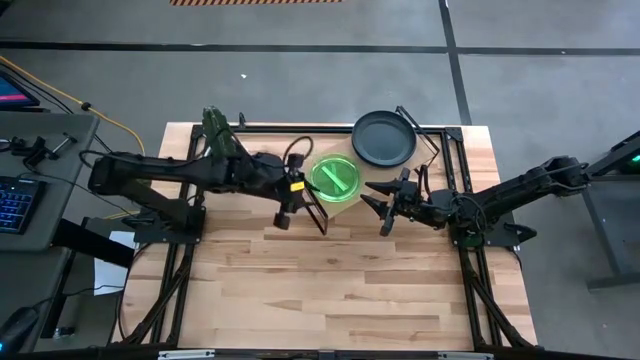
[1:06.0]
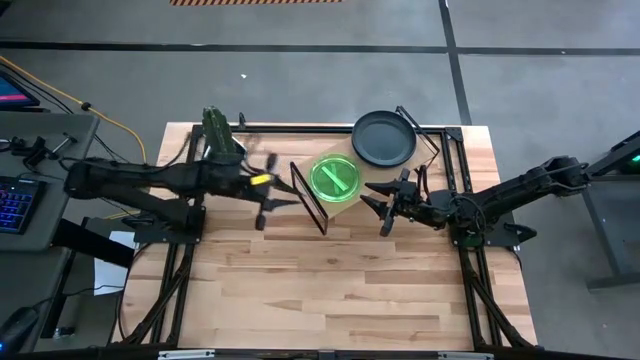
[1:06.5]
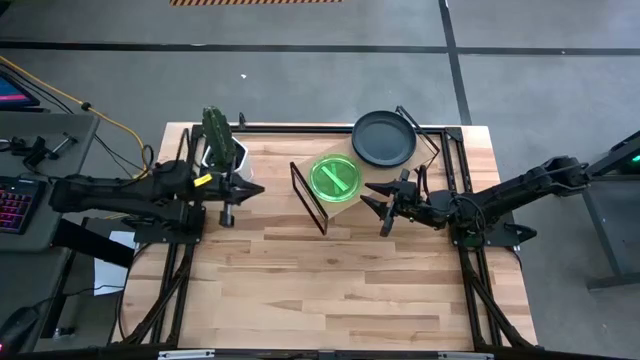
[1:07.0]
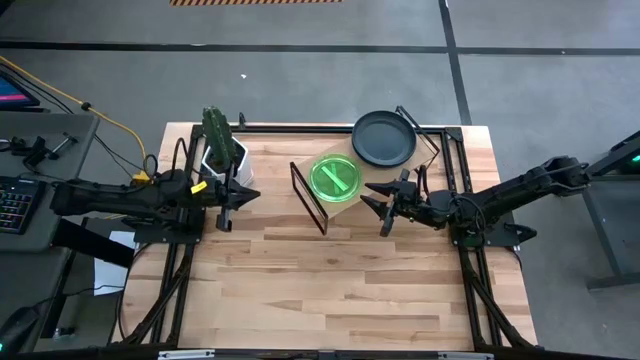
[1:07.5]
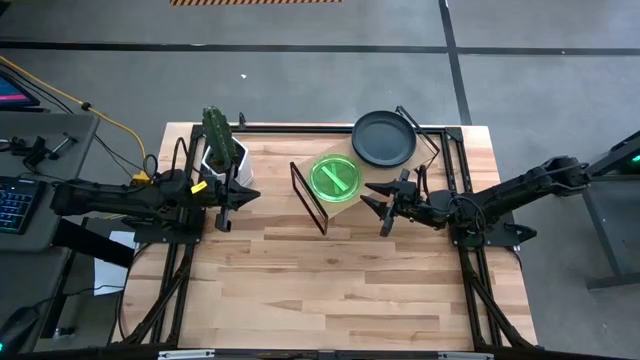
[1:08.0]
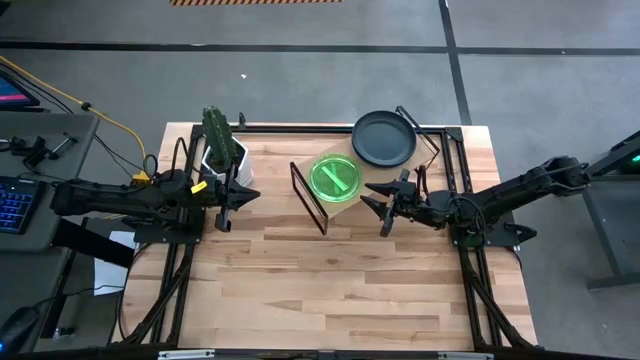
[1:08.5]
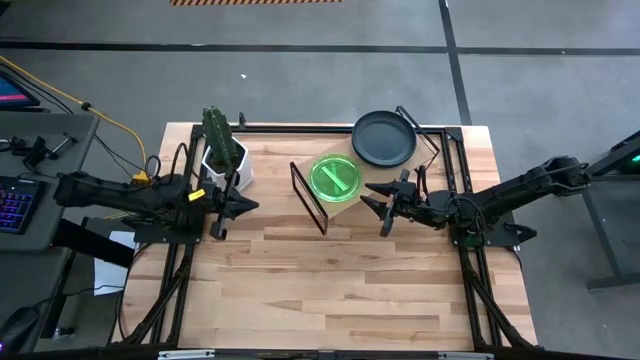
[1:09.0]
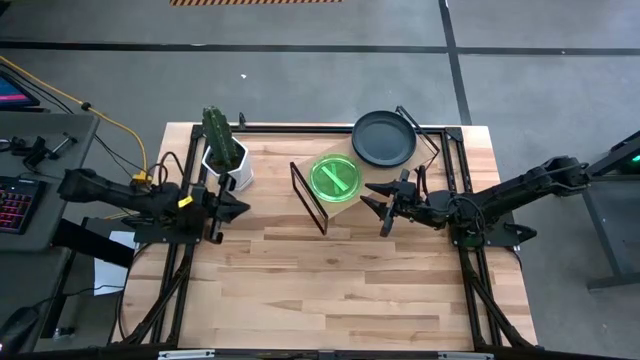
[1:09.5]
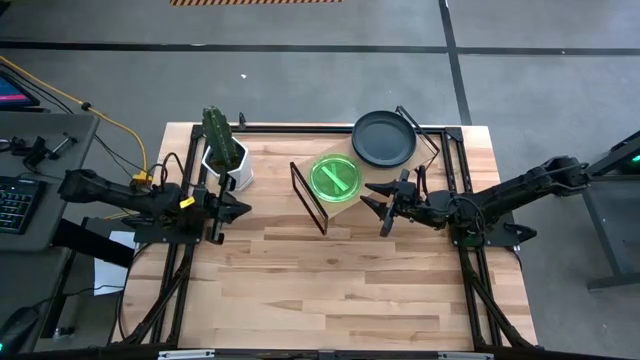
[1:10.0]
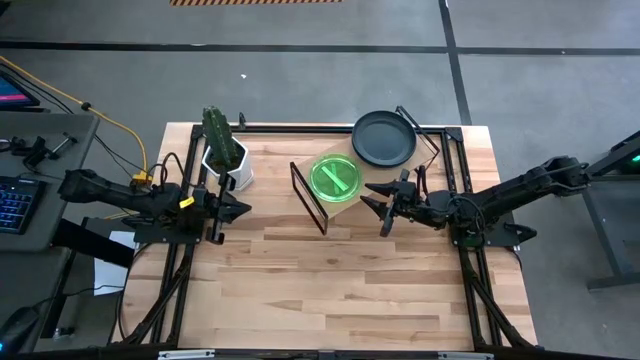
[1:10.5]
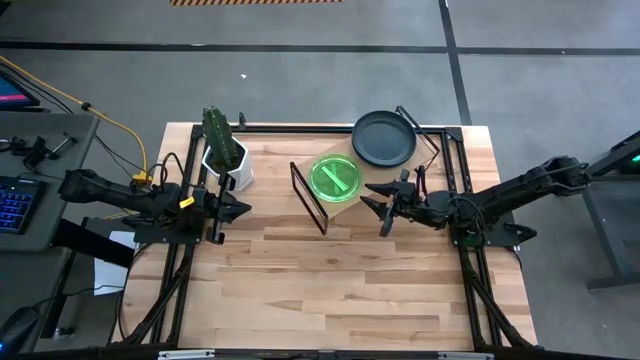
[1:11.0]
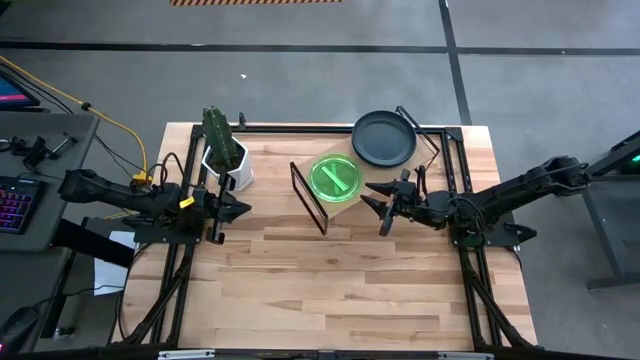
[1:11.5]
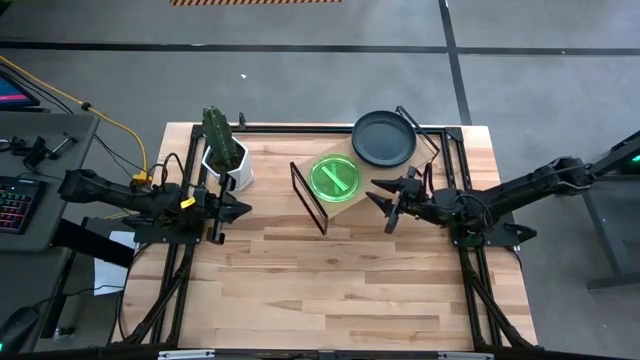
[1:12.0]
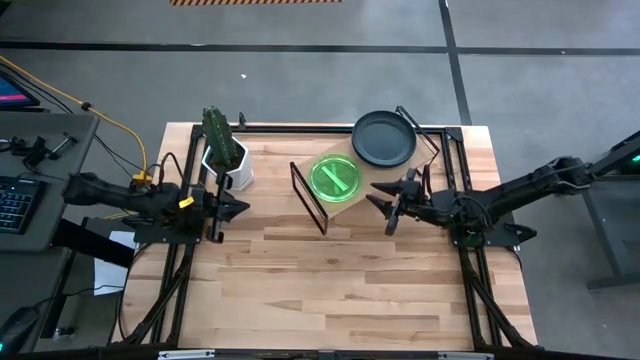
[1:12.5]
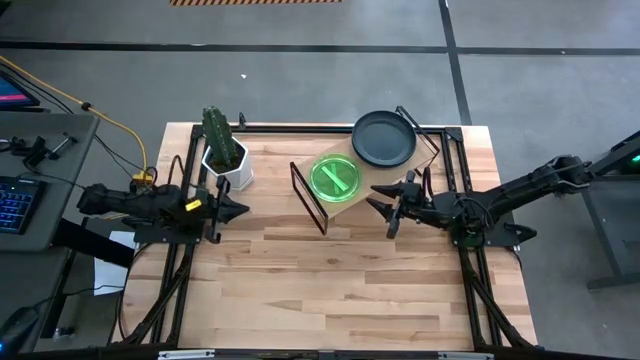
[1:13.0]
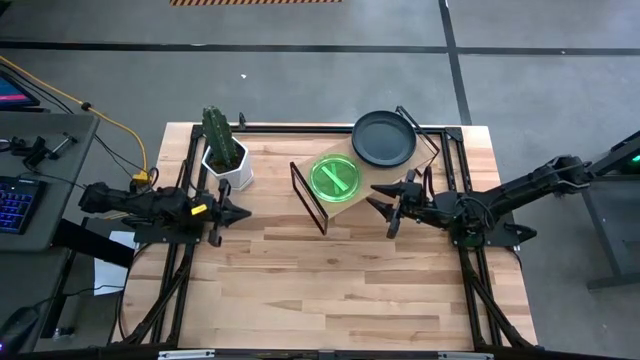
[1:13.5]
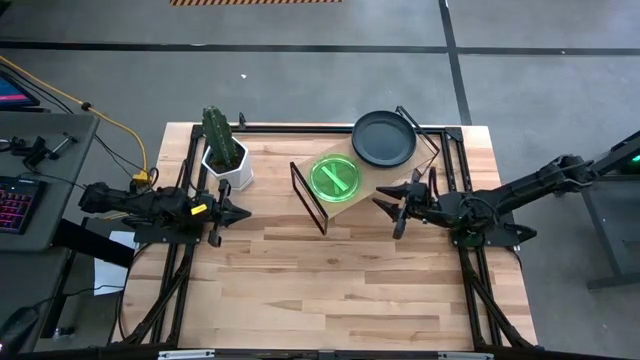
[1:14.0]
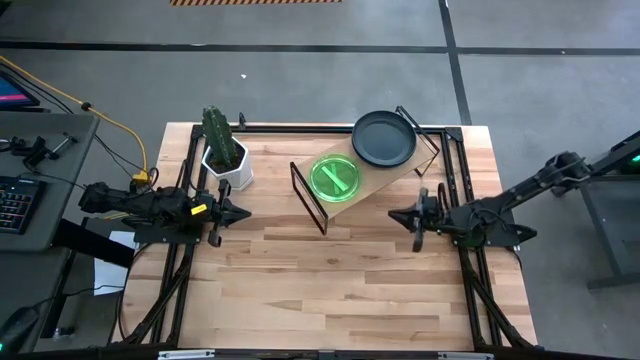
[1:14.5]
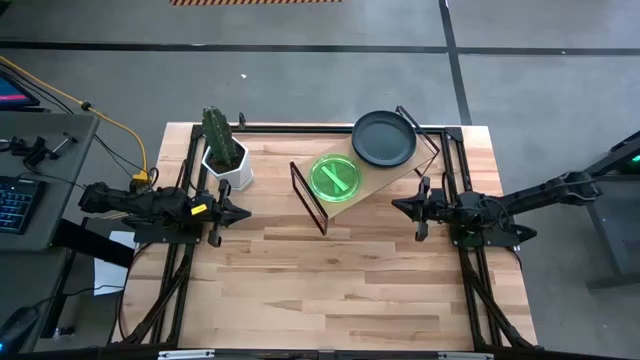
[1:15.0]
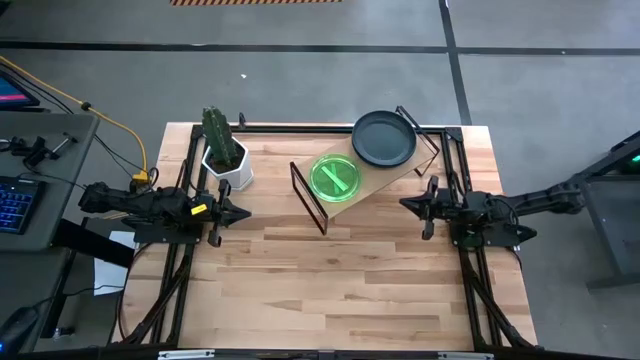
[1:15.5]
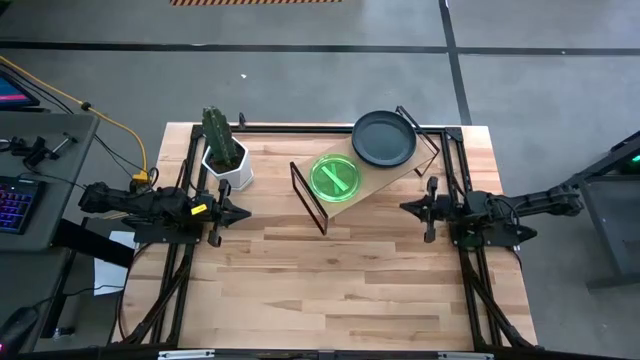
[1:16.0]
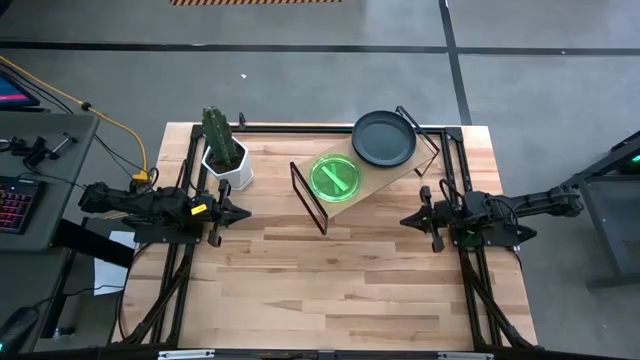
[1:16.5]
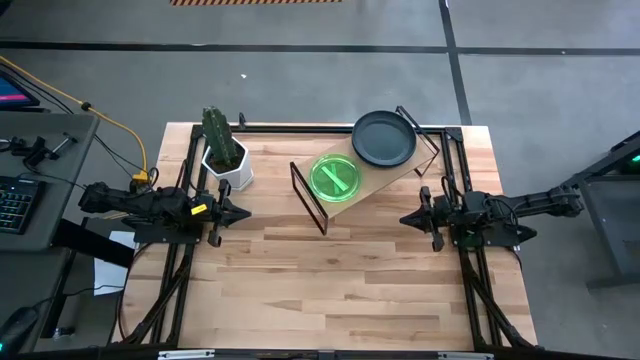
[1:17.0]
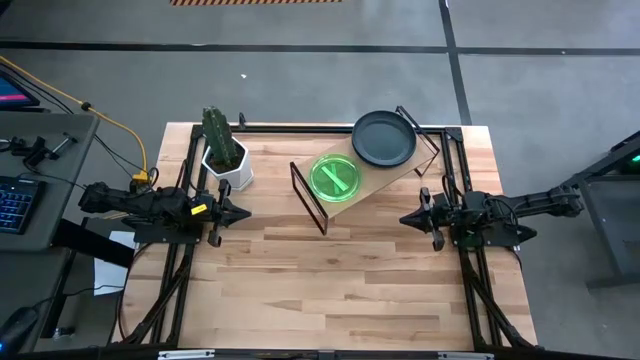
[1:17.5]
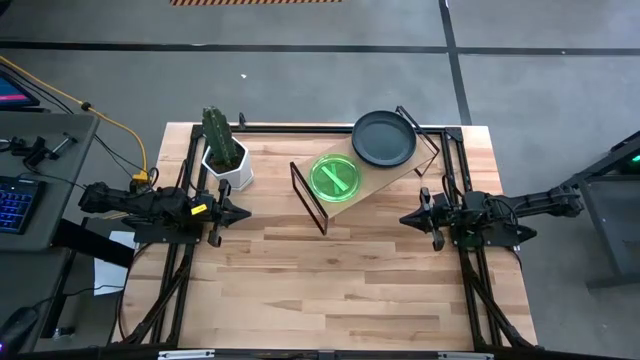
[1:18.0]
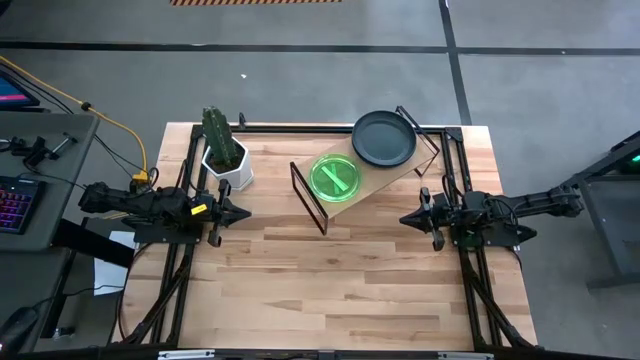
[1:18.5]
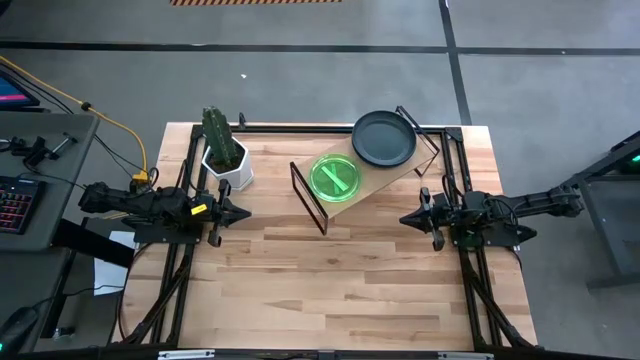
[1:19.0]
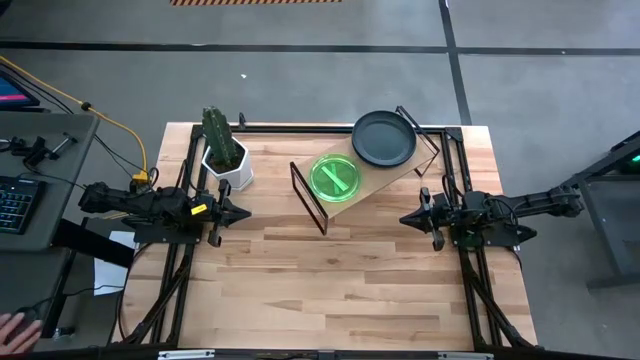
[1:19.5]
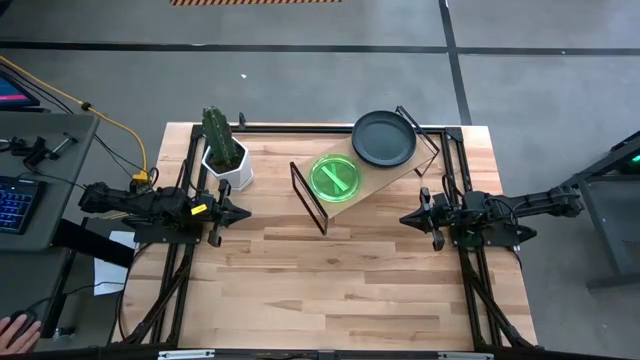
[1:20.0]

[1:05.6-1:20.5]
Task: Place and stack plates onto a shelf
Return to Home Position

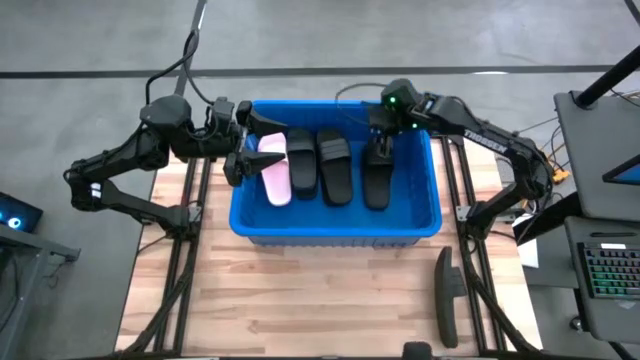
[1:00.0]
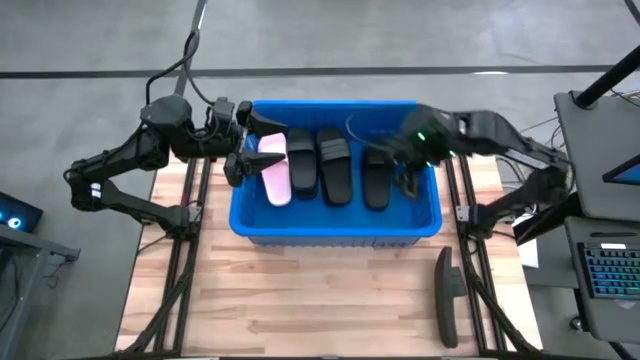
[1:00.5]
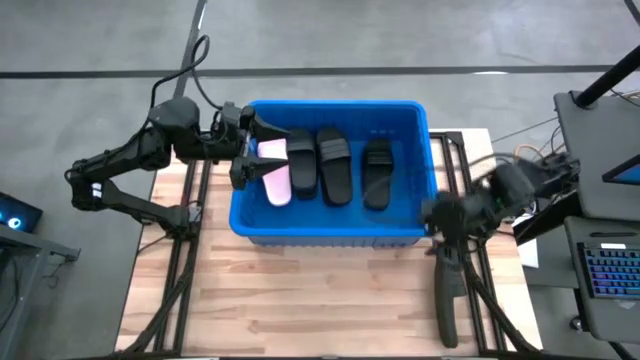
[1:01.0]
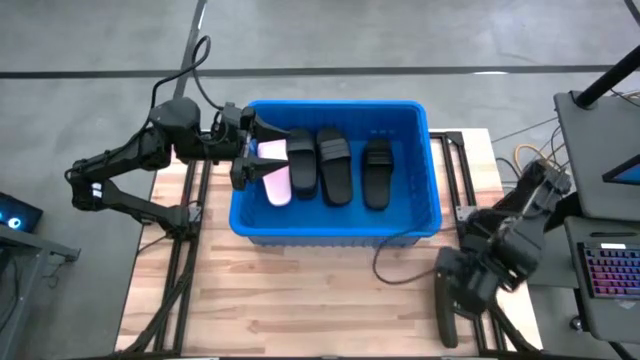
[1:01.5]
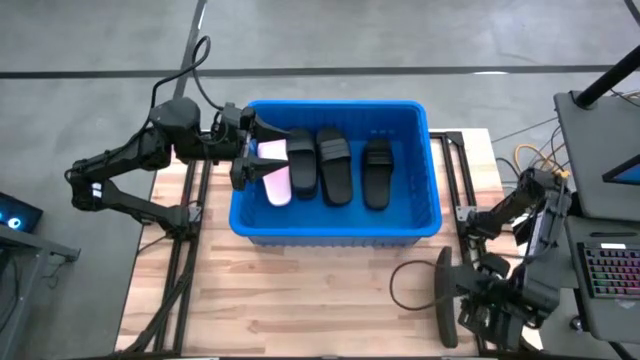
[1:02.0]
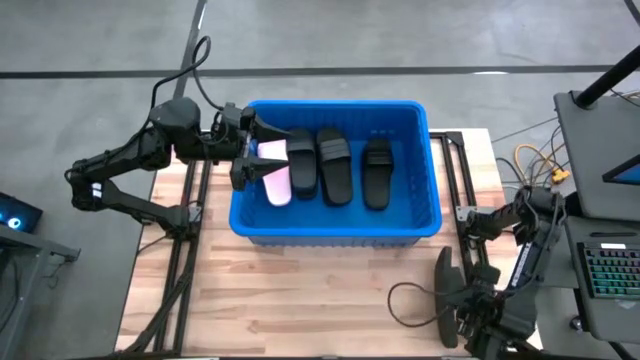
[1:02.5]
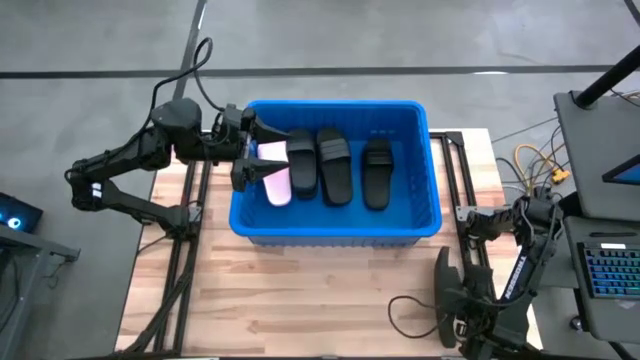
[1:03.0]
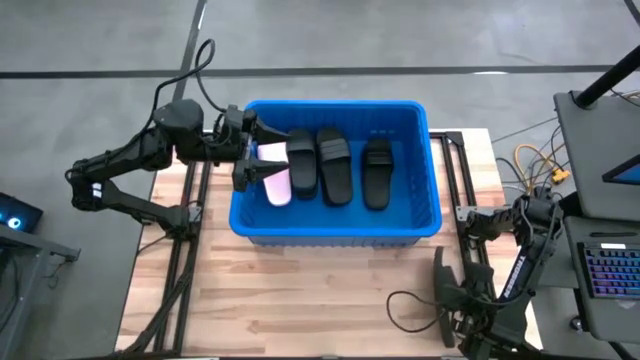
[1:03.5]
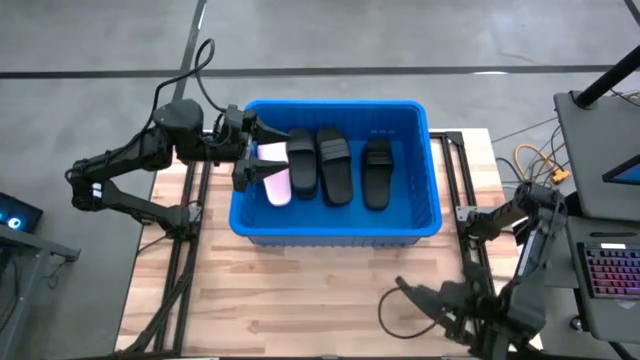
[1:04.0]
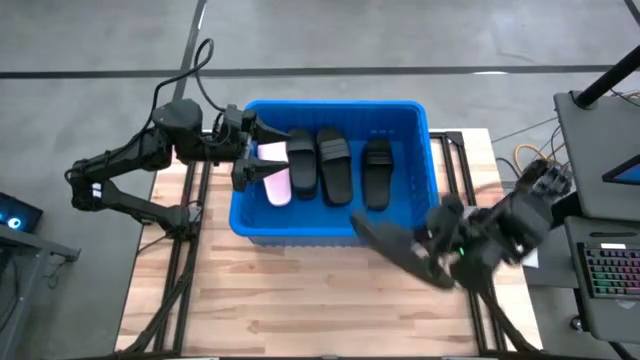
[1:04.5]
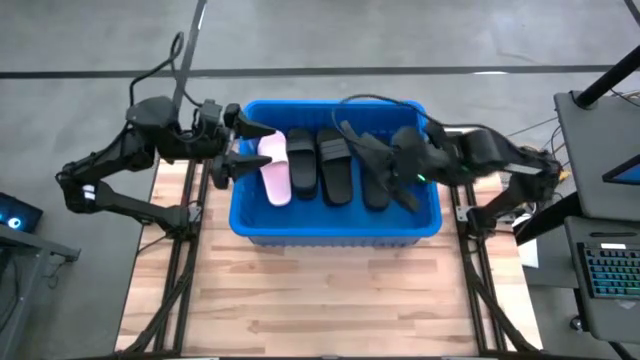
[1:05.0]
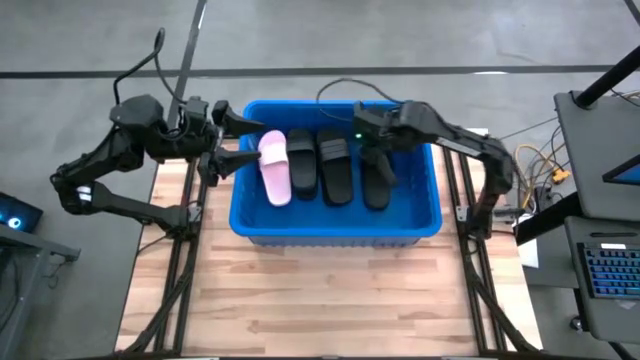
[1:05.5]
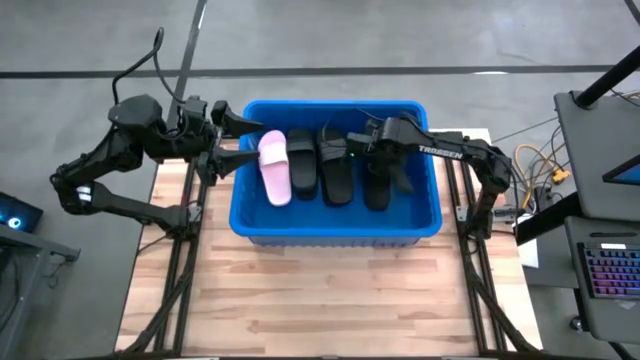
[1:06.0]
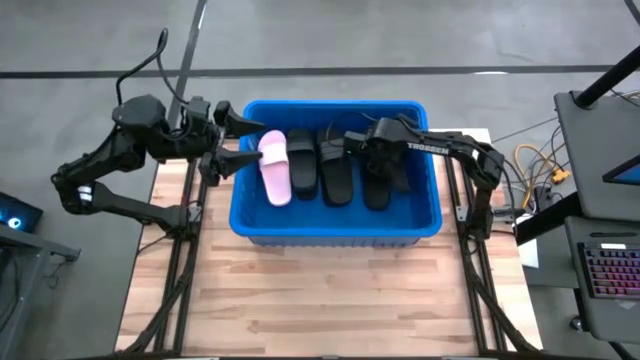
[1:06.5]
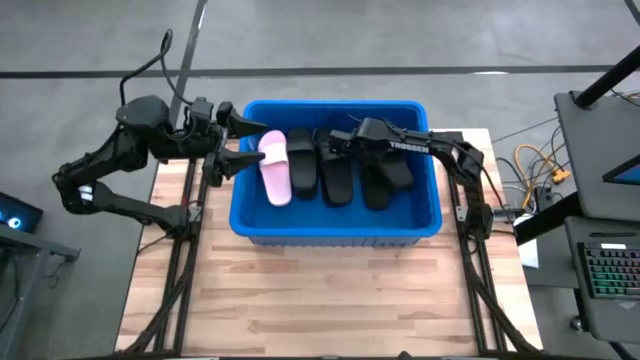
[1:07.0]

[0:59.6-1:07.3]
Task: Pick and place slides into bin
Put the black slide into the bin
